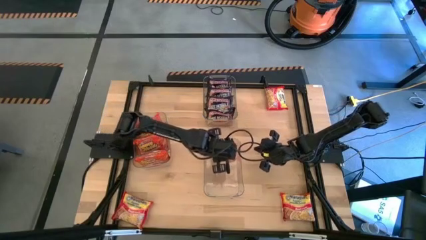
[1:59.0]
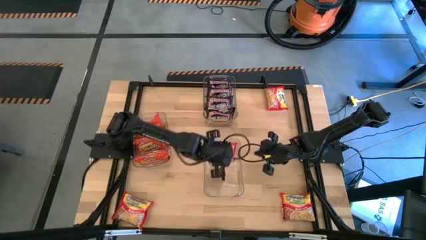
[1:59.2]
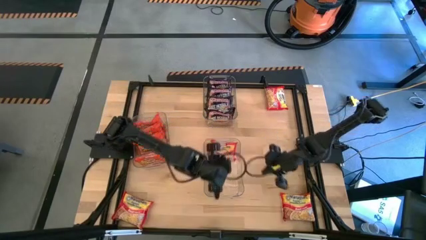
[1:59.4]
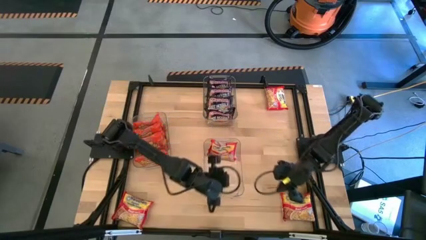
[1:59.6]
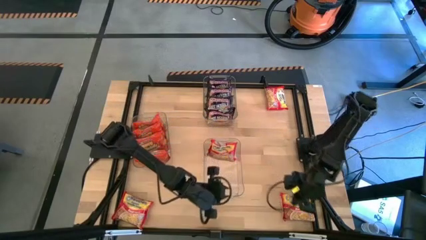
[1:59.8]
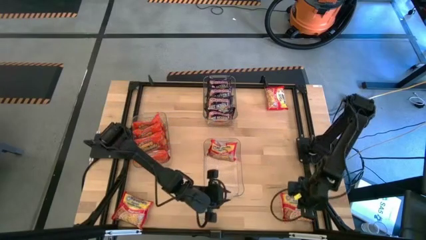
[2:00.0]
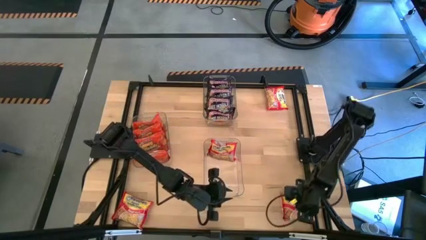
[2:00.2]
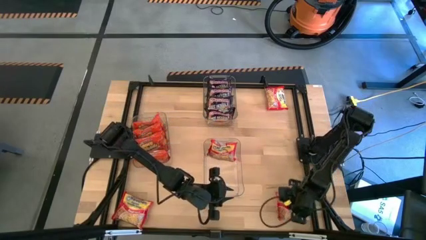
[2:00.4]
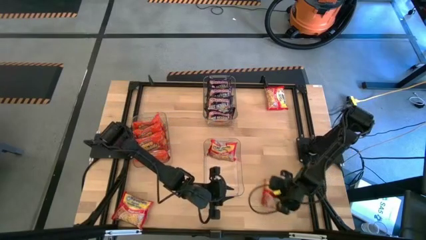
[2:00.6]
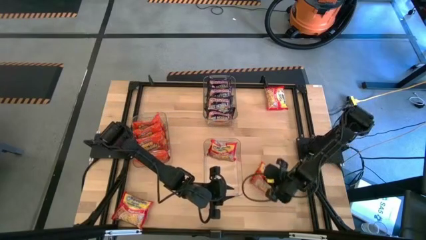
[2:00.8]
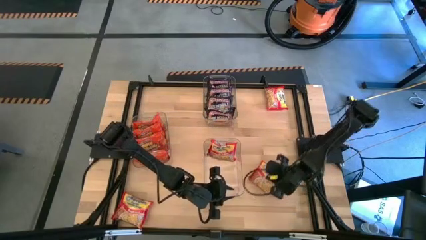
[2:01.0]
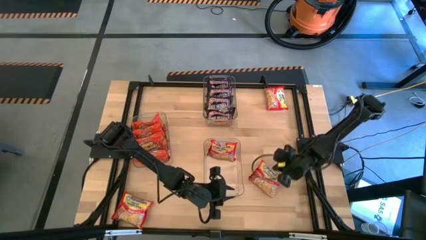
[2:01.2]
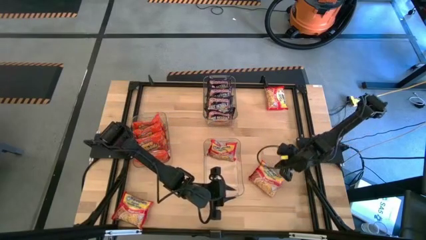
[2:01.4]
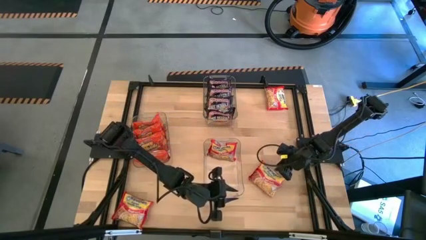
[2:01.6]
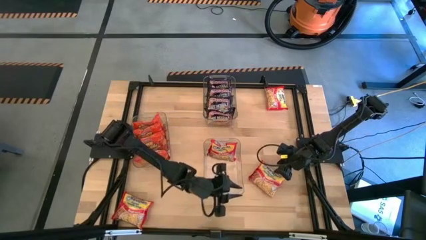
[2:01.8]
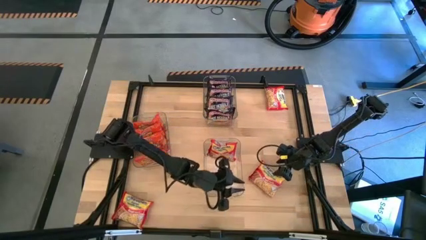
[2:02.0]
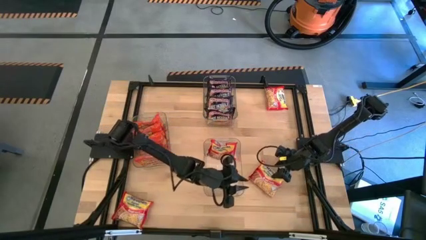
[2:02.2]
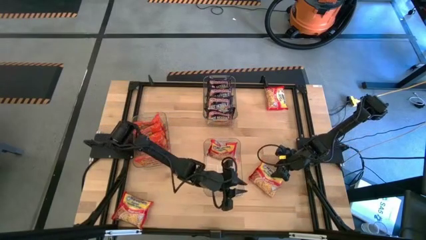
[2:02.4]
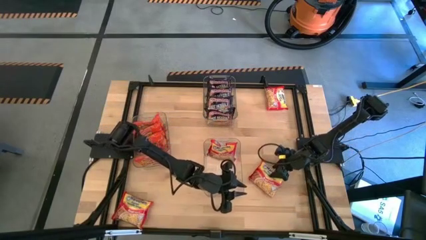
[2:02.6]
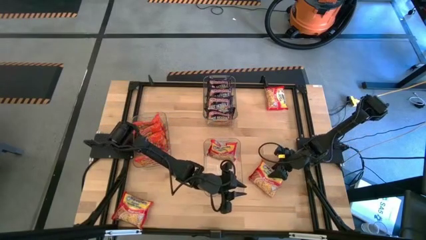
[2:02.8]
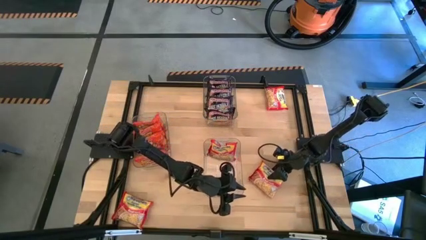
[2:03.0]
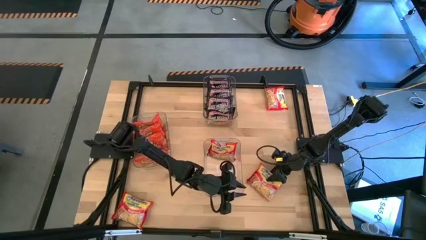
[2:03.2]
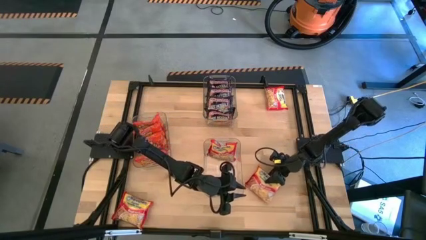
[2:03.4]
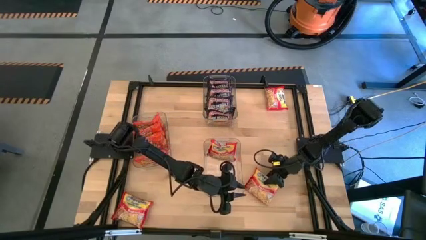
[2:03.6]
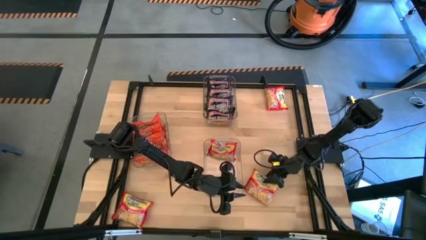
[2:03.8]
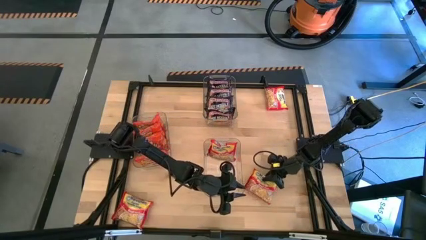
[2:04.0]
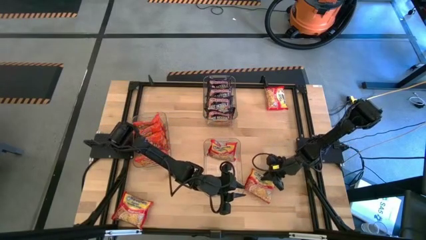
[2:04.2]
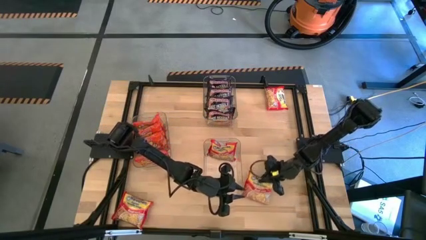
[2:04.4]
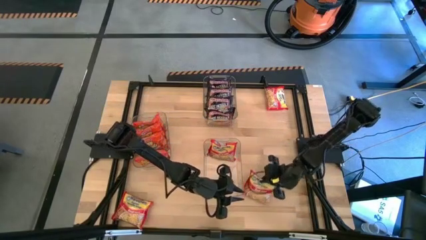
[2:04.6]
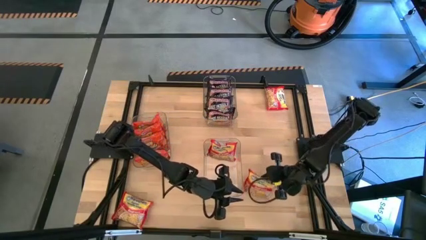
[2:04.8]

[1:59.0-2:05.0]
Task: Sort Maruchan noodles
Put the red noodle pack into the bottom transparent bin

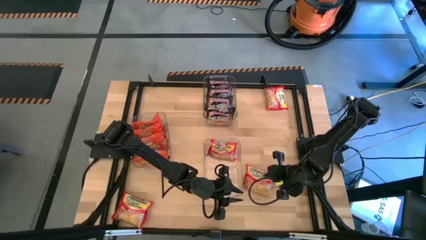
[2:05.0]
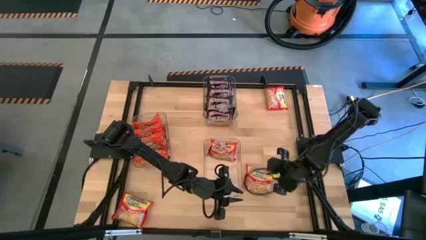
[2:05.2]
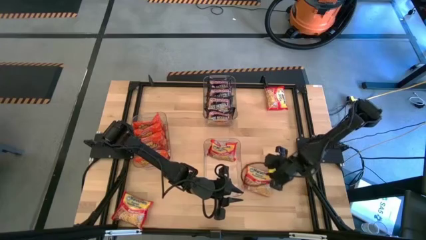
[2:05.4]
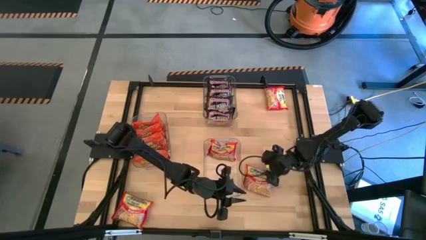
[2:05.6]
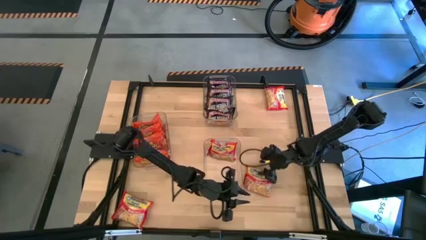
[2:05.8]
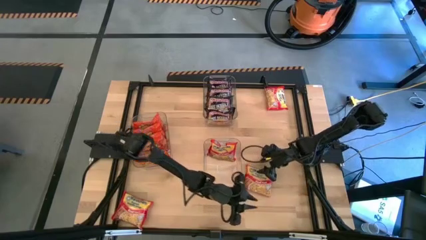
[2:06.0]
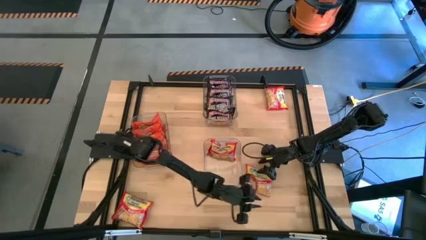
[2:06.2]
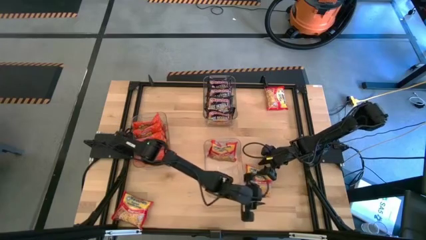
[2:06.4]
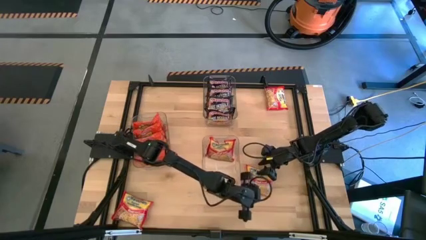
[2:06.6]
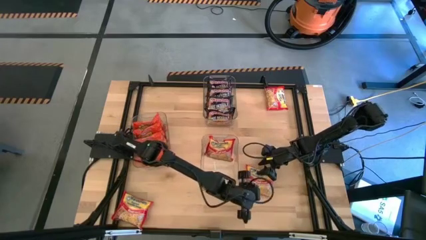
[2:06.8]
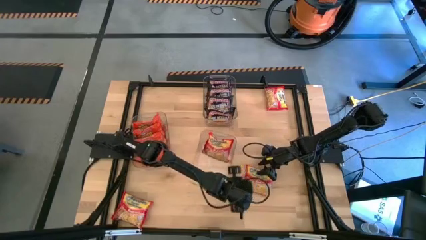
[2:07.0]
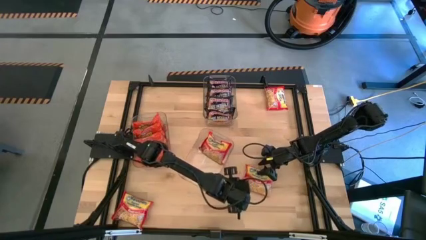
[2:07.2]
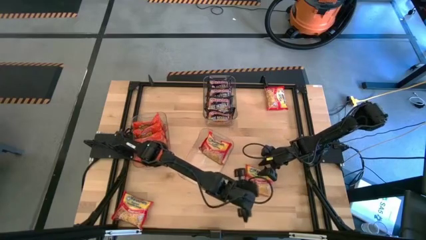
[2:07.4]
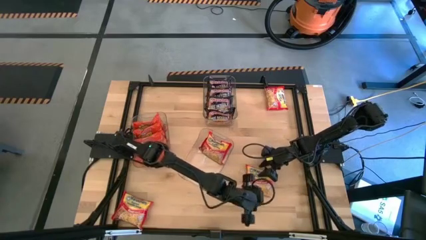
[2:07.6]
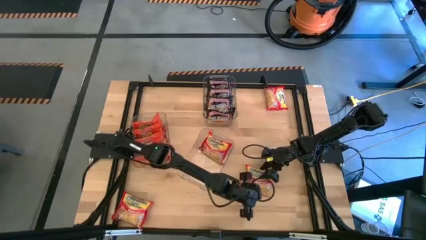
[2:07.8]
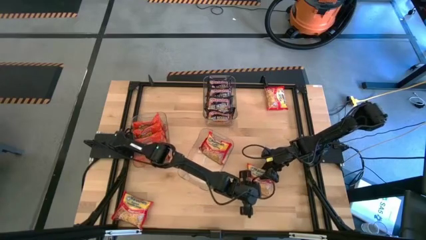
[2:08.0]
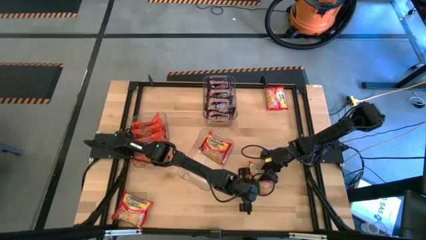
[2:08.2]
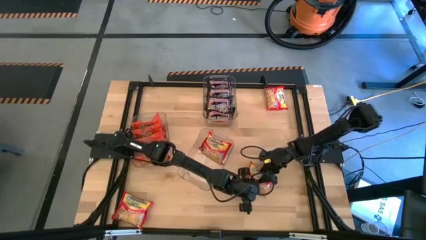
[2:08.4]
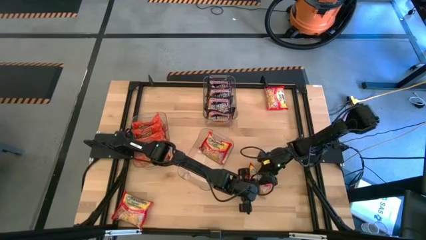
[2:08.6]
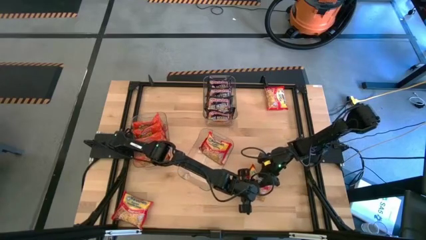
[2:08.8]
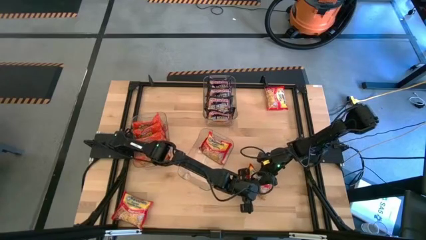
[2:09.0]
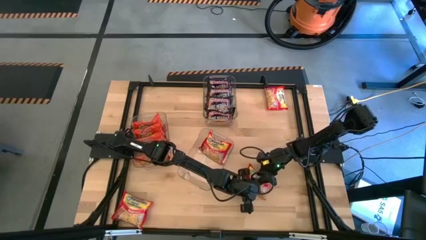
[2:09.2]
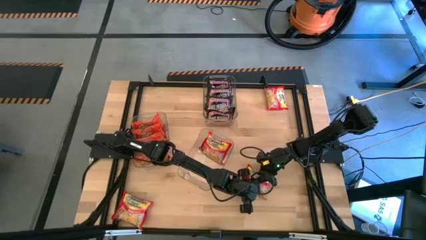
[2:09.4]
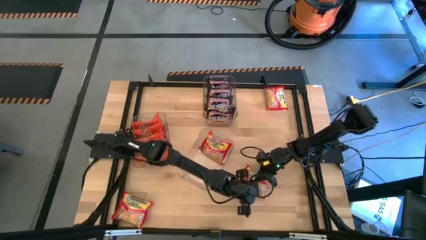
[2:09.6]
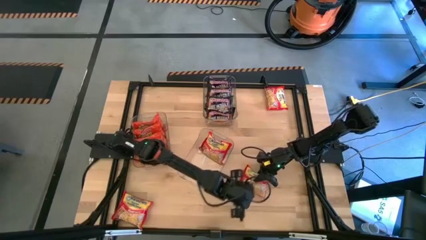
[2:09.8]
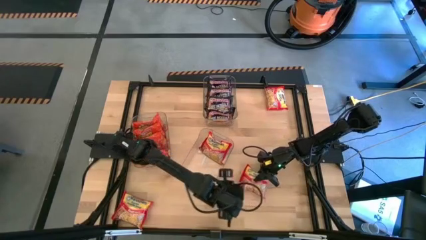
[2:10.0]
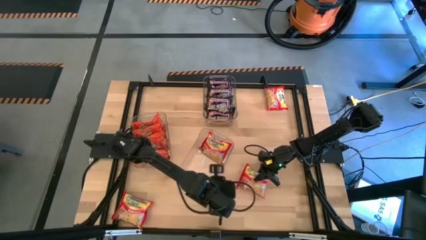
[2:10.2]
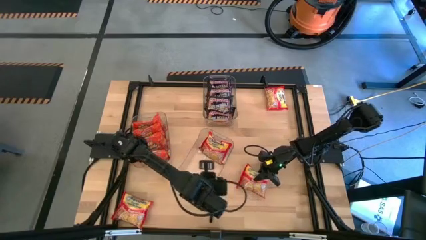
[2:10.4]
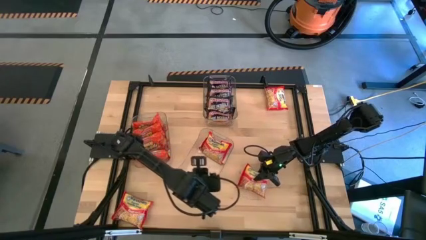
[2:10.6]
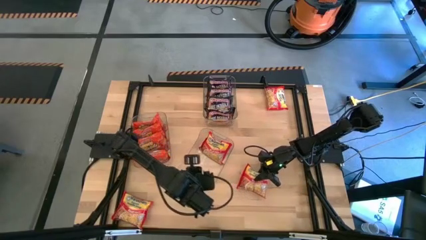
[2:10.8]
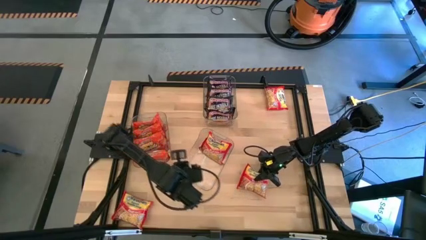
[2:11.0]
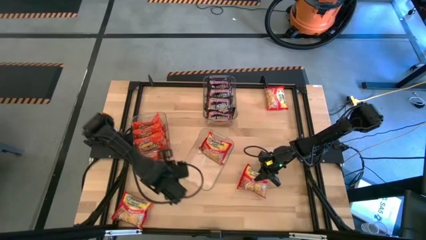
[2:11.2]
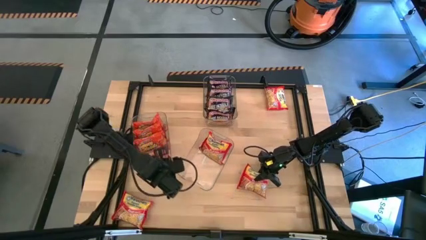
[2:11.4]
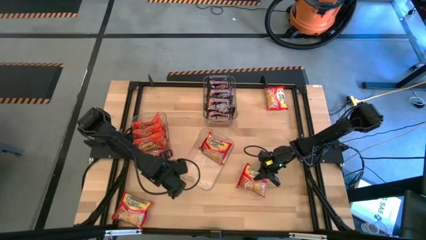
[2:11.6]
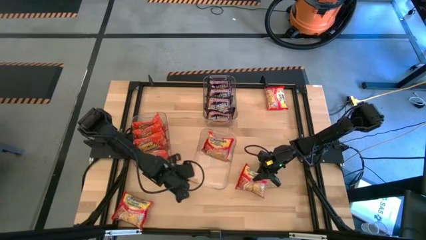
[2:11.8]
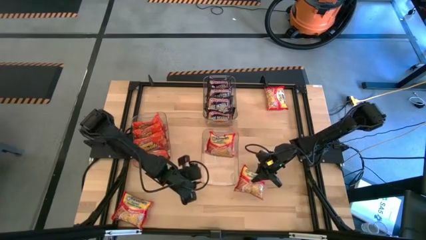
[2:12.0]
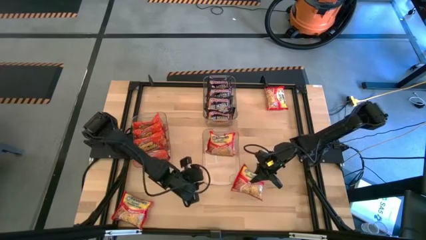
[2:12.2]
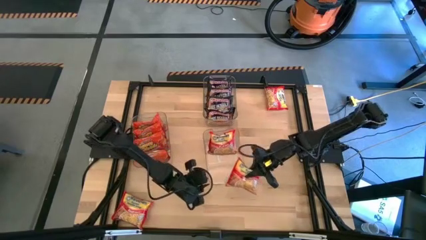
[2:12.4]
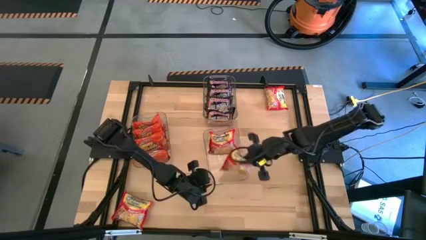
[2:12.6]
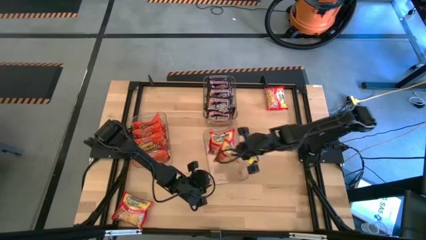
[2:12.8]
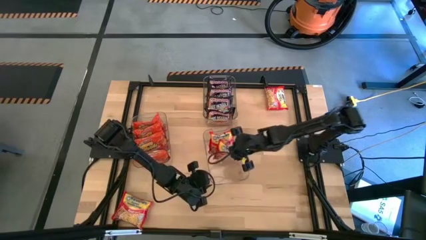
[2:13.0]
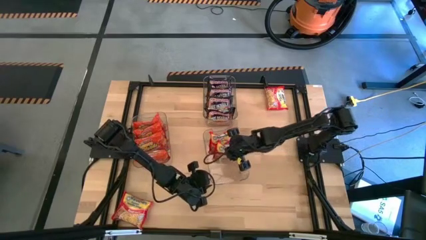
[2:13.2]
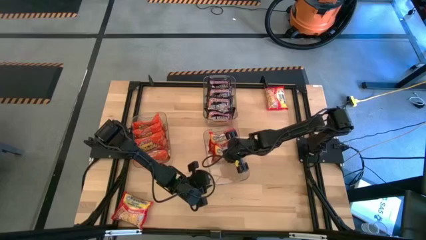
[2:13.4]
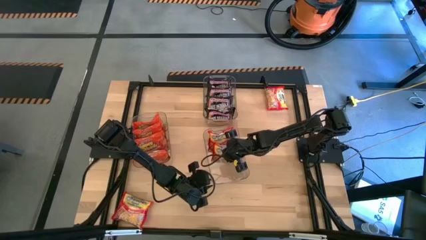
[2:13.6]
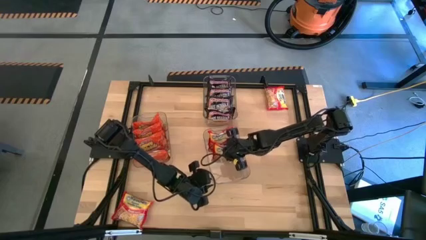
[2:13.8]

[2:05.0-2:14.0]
Put the red noodle pack into the bottom transparent bin

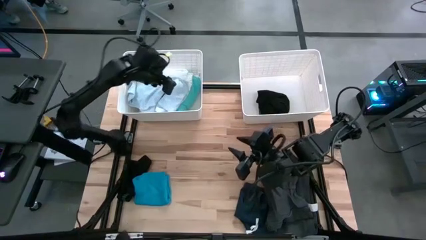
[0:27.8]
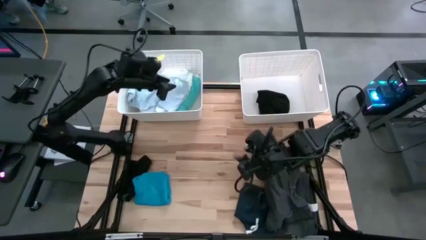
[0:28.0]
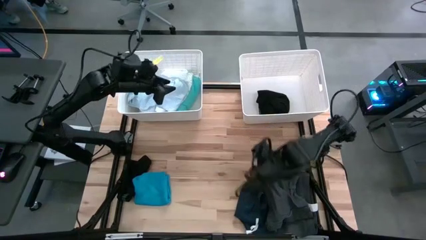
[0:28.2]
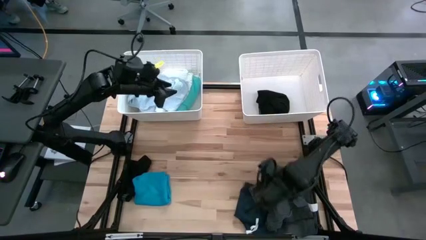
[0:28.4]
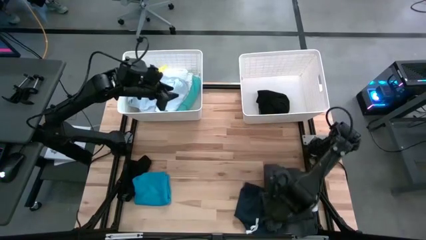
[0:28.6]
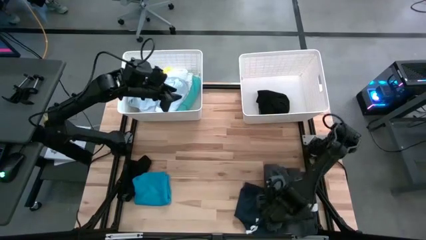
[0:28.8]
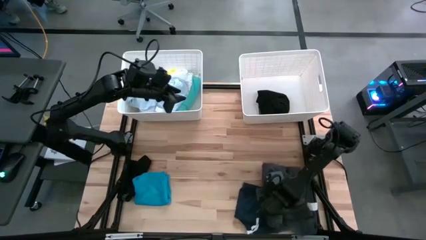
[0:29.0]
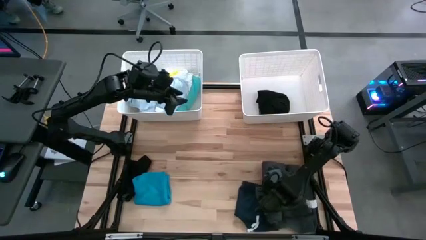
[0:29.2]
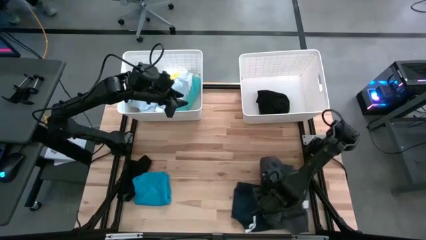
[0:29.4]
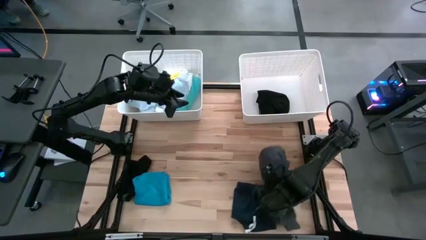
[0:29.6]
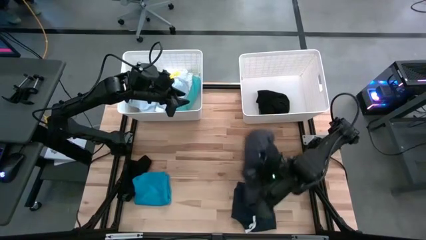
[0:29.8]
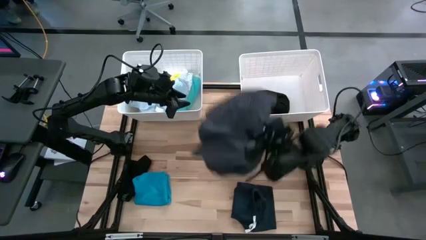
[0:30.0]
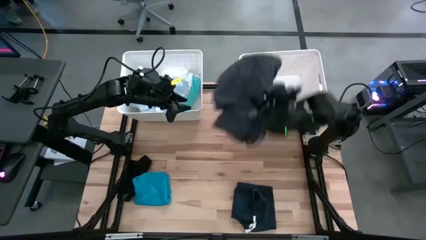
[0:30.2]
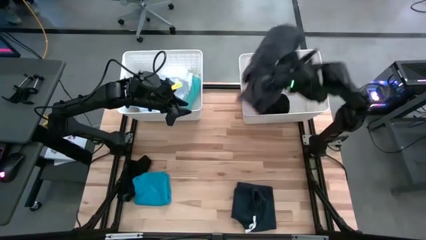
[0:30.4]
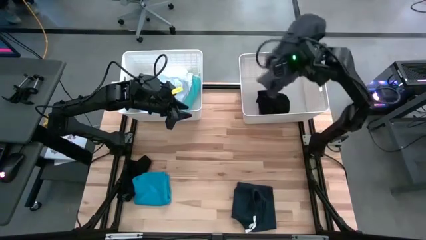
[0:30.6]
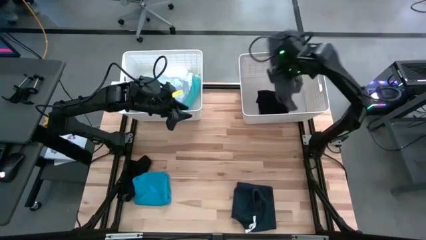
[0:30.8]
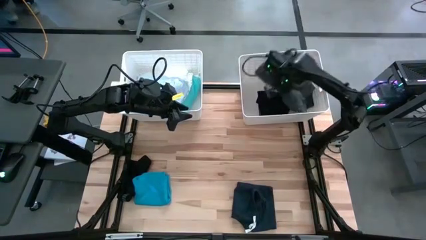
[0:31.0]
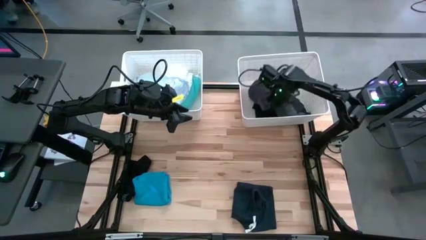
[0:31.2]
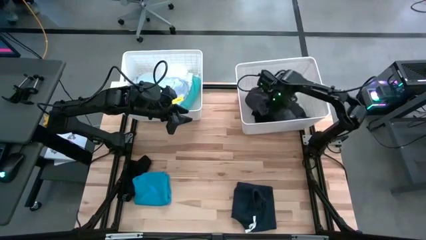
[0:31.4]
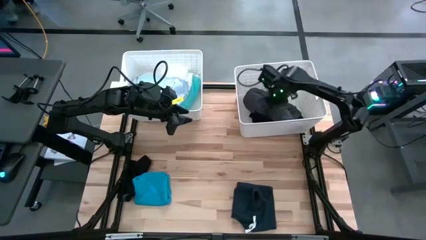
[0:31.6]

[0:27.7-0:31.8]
Task: Sort clothes
Put the gray shorts into the right white bin
